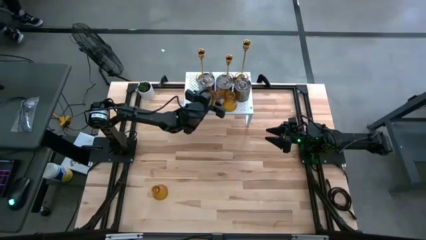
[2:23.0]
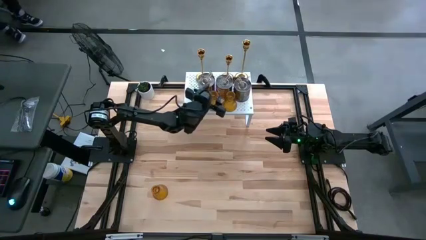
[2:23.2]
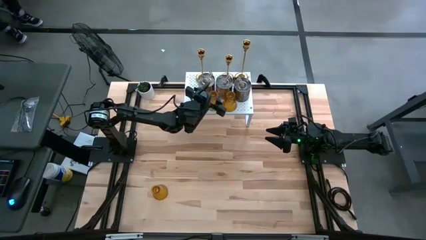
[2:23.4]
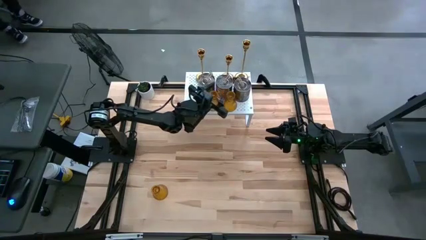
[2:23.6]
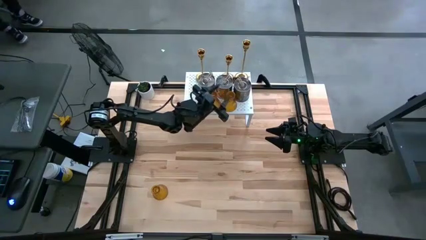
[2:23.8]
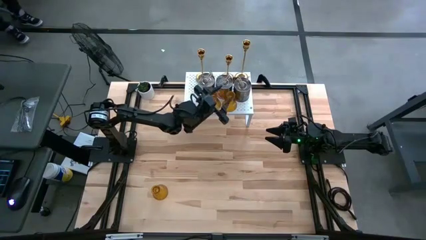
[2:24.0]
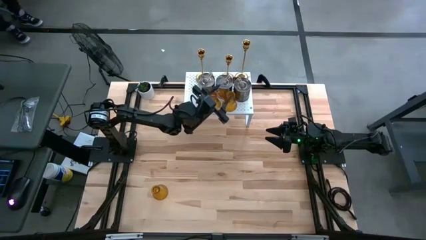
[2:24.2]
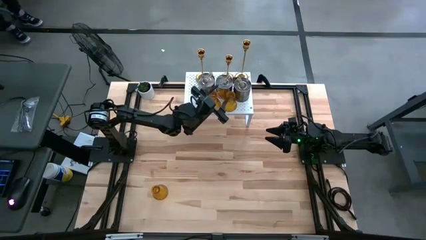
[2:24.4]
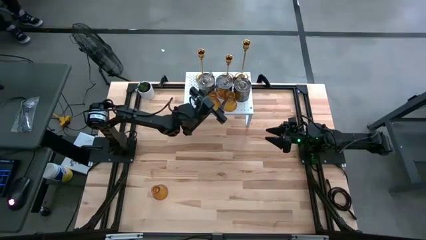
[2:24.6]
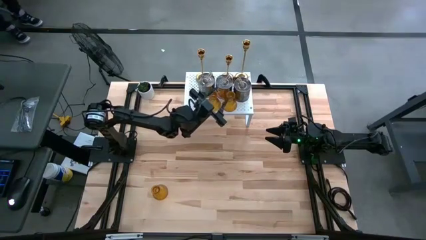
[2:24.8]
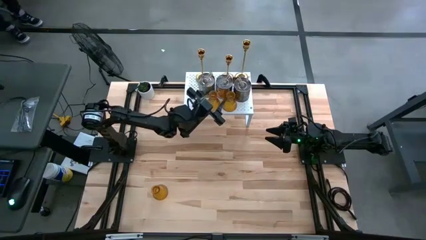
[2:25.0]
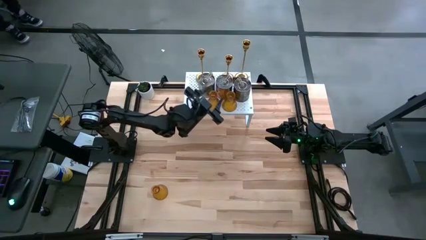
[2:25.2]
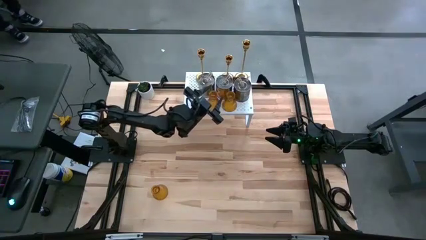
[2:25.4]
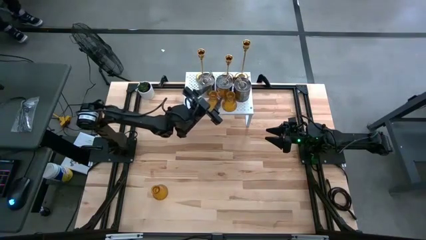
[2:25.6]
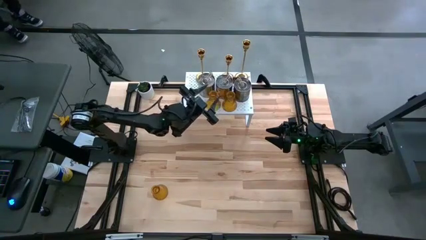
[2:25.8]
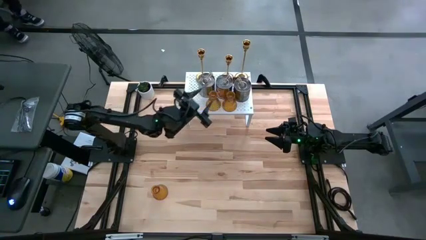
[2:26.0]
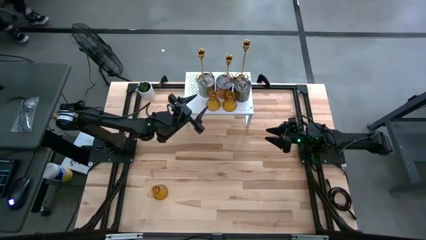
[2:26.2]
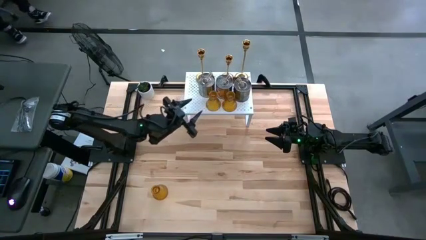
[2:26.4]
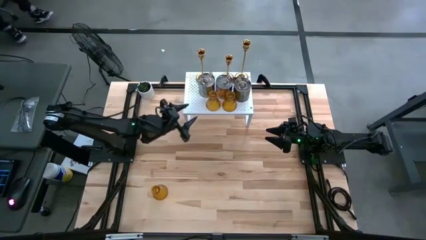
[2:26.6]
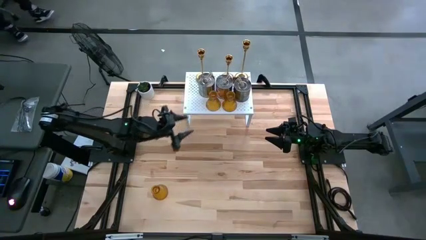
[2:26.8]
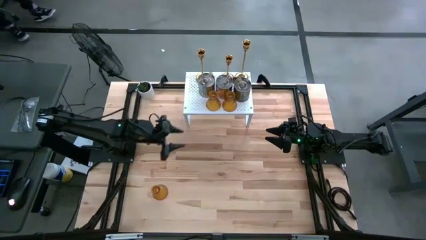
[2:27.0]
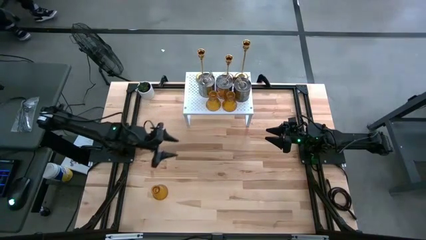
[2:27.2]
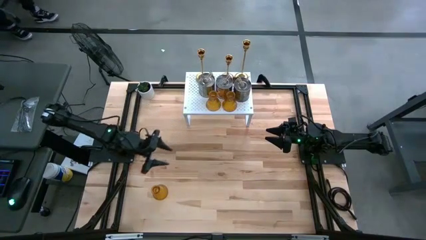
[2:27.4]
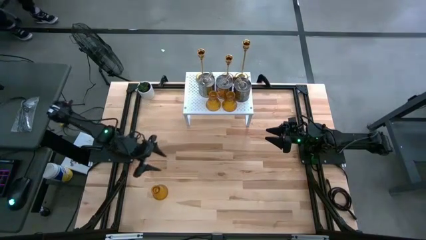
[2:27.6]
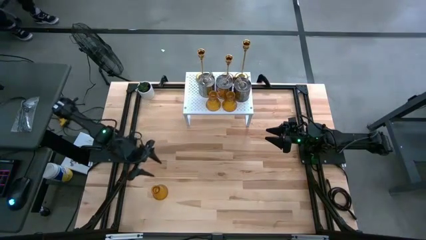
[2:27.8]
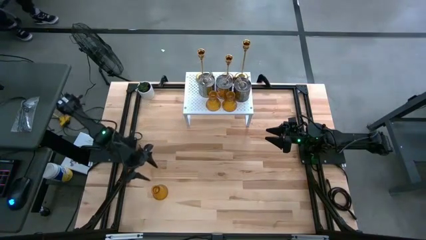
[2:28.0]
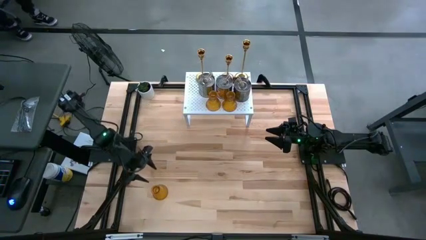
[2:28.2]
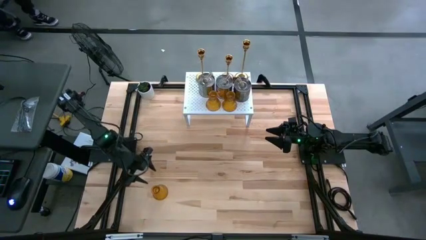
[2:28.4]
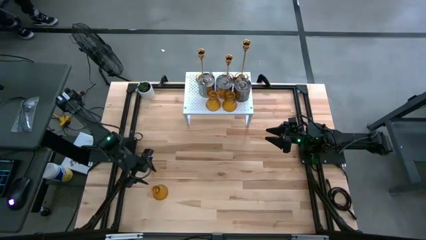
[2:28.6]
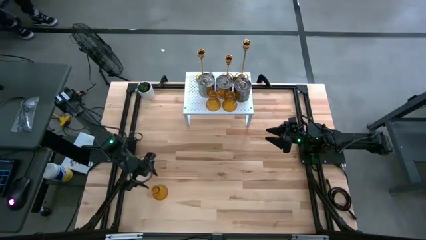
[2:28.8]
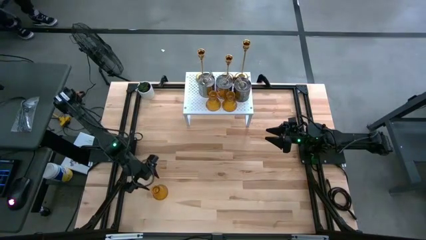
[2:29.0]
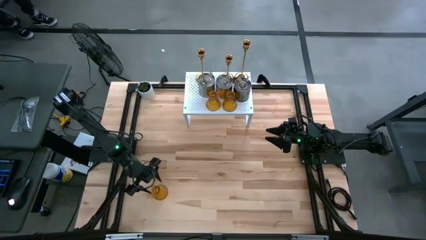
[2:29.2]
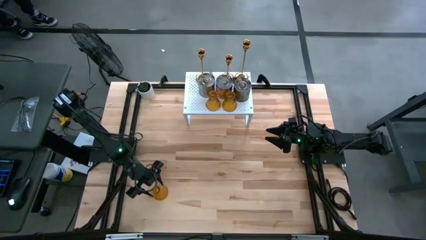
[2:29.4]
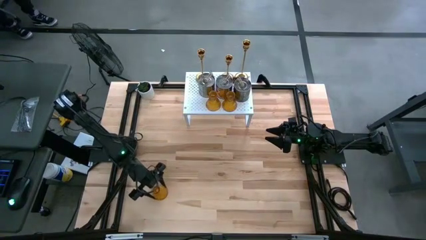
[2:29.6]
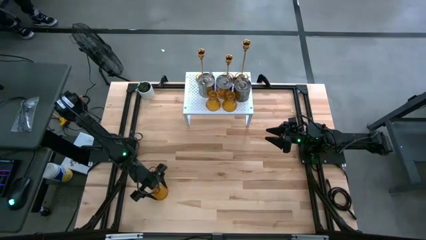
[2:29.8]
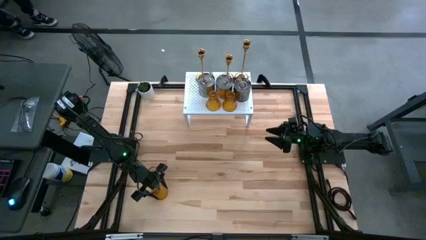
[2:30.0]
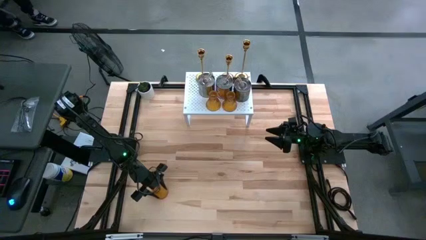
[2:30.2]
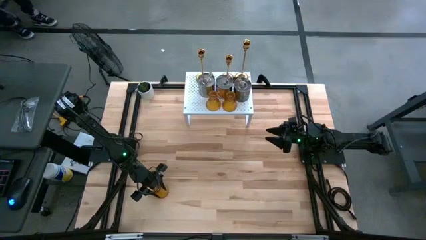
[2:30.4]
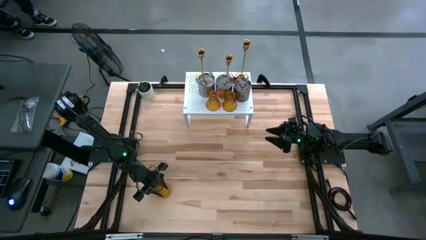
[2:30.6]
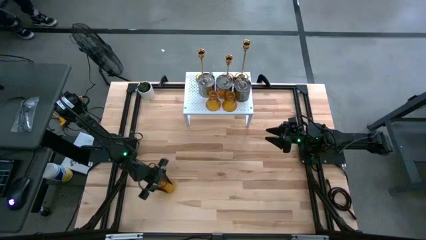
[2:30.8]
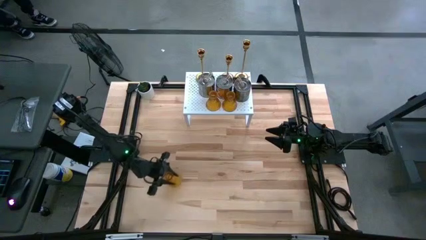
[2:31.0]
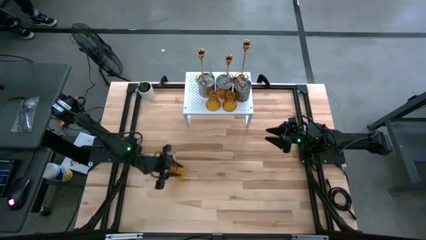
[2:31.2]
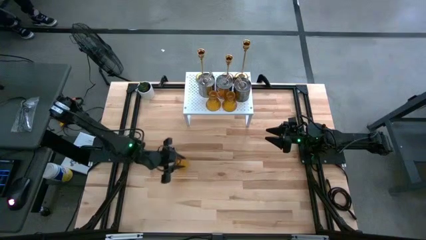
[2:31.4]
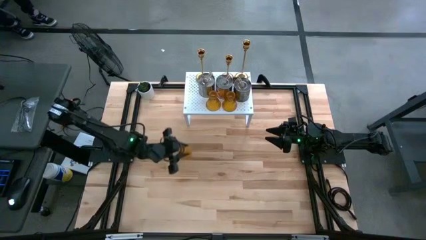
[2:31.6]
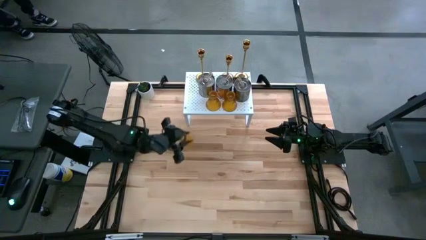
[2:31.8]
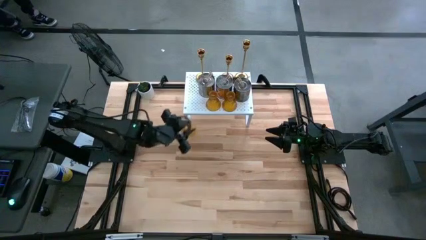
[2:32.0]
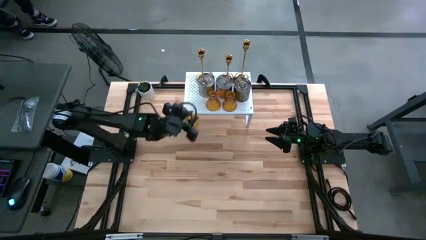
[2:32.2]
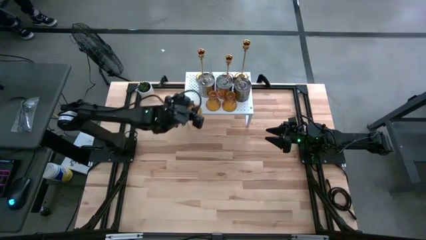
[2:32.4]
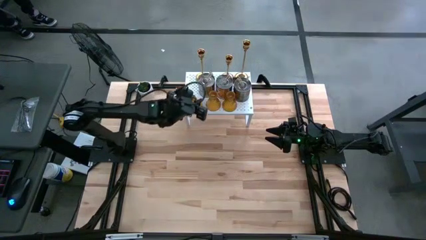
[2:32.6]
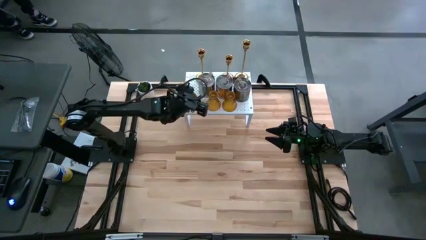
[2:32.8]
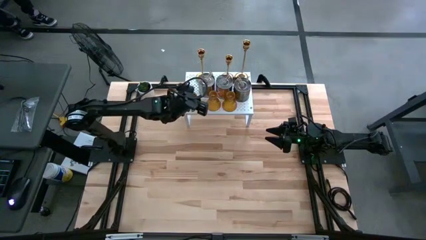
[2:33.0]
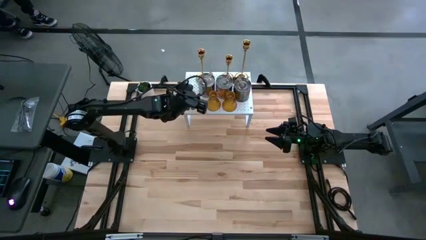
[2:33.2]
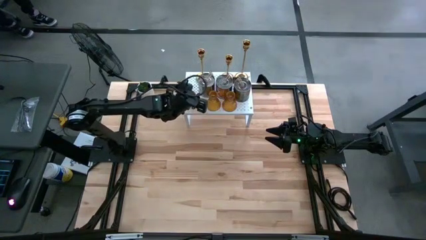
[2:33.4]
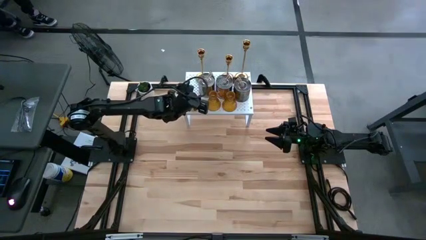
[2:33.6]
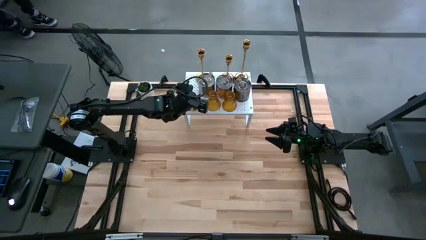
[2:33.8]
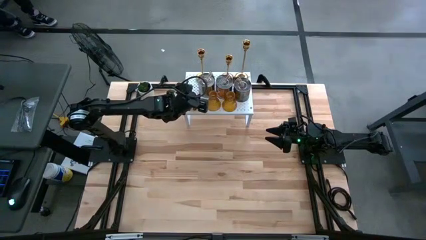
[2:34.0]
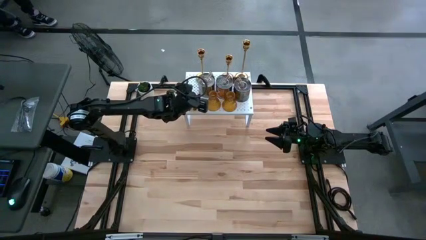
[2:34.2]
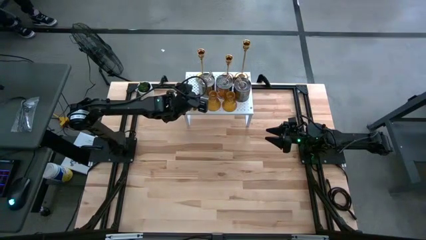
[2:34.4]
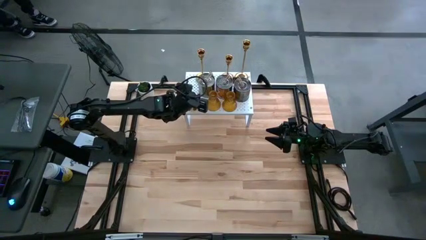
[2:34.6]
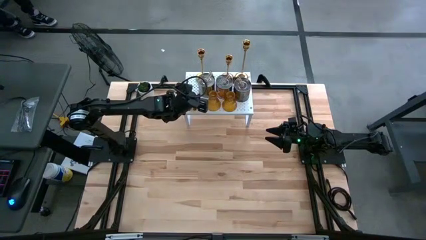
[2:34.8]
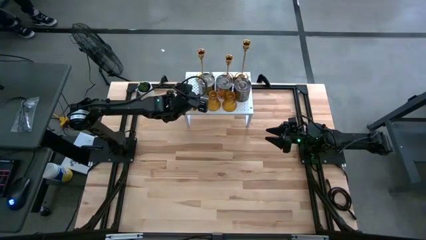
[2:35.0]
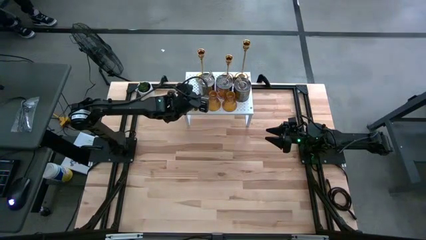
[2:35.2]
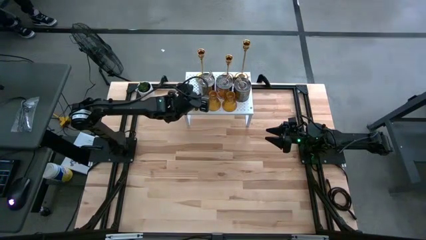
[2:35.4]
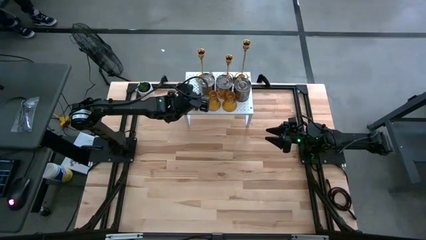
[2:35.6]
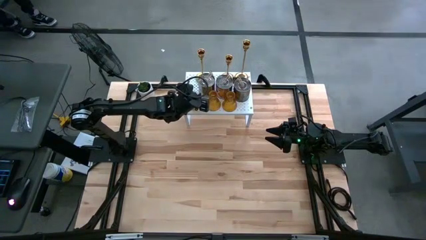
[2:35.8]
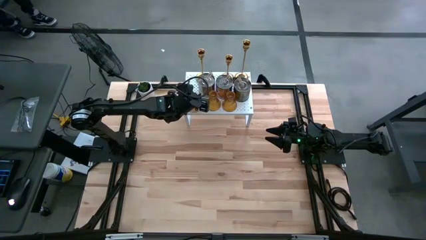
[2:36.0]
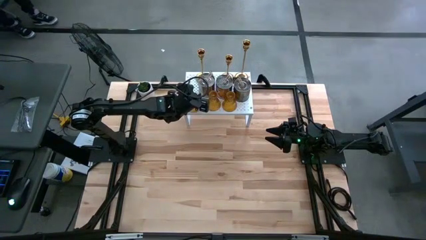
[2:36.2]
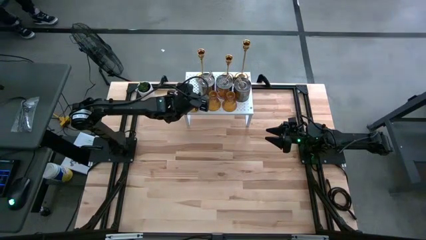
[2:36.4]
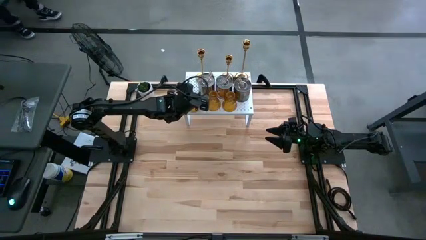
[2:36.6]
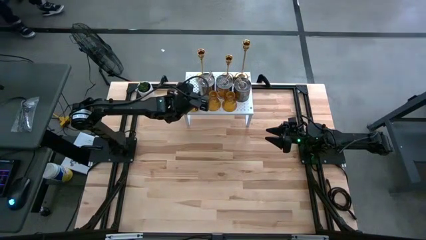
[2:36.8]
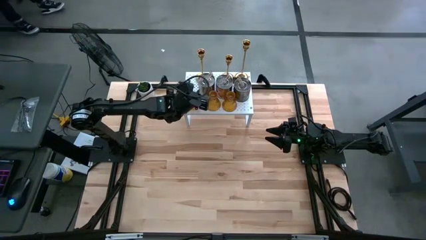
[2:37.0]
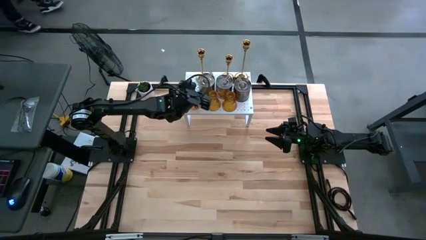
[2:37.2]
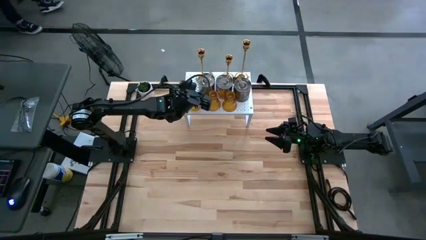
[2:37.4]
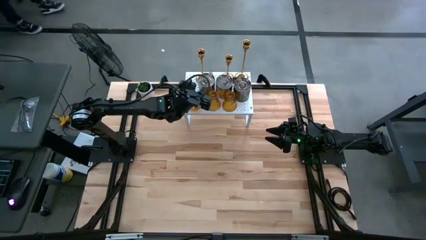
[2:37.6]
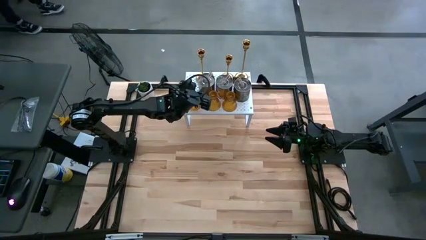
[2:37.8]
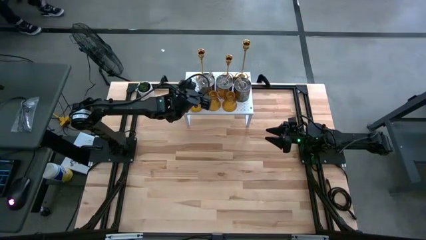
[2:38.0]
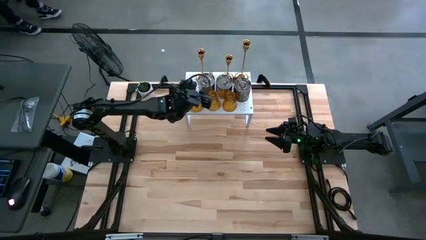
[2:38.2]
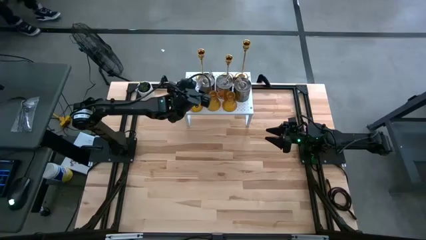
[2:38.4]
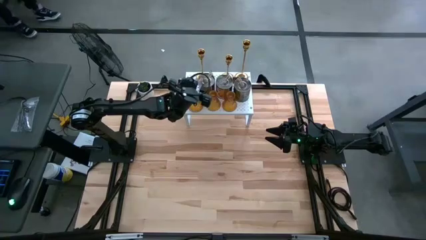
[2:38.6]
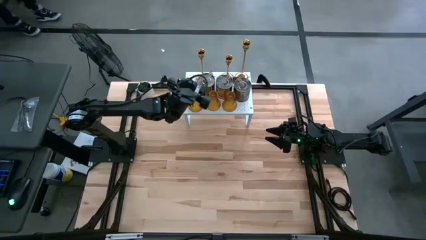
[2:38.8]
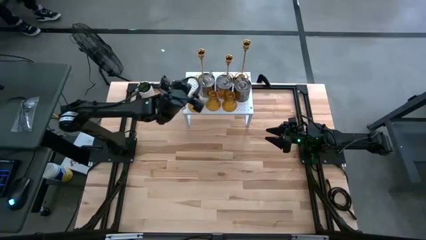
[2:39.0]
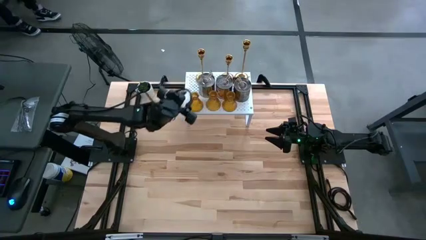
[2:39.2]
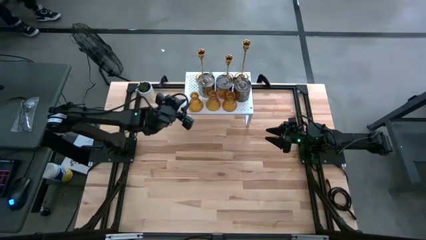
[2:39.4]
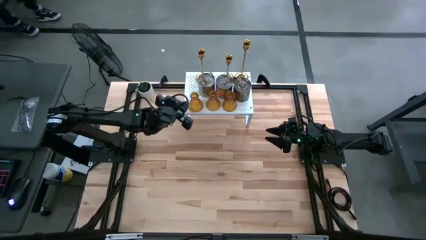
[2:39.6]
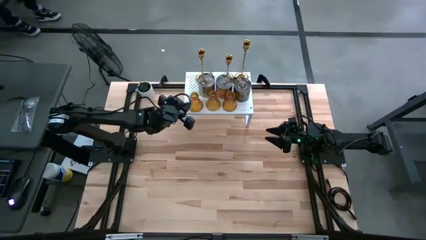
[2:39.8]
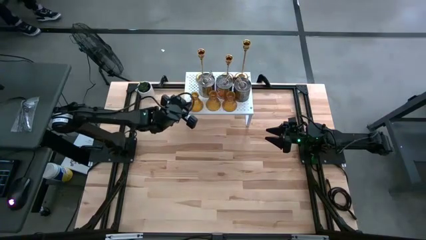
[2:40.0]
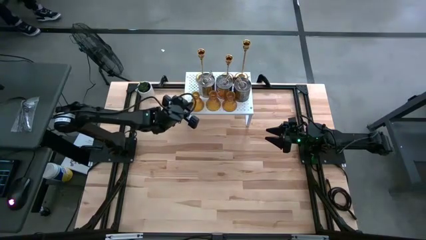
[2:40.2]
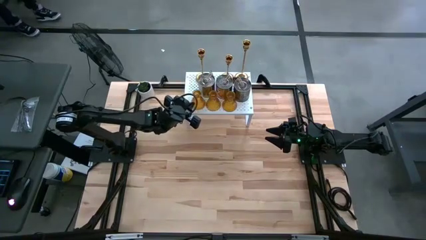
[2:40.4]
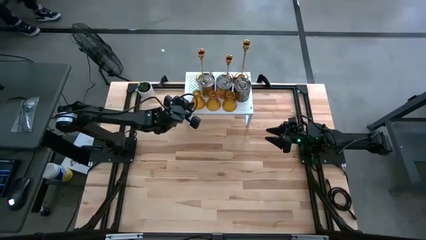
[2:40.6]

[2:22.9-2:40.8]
Task: Pick & Place candle stick holders
Put the orange glass candle holder on the shelf
